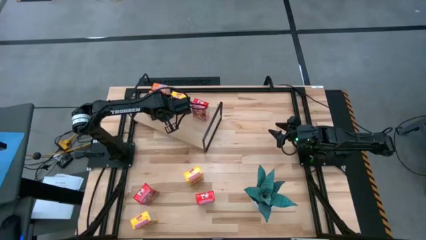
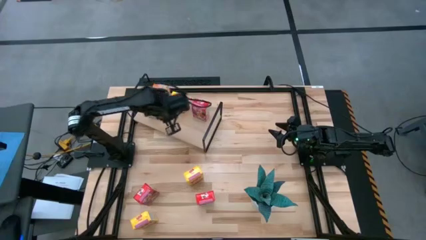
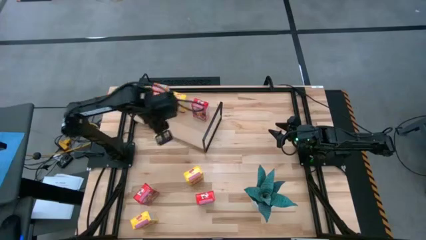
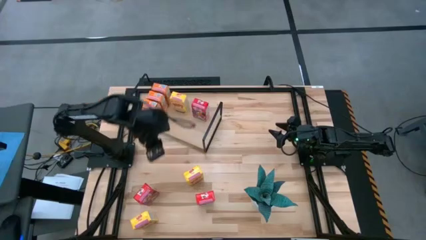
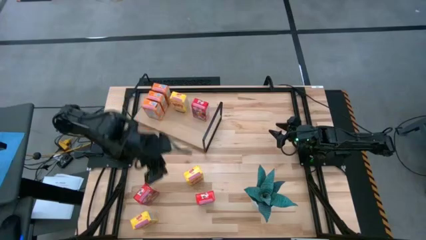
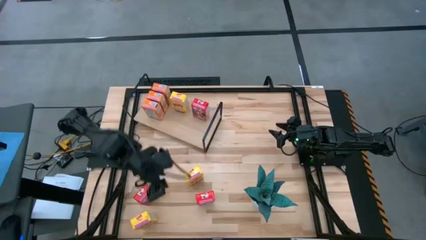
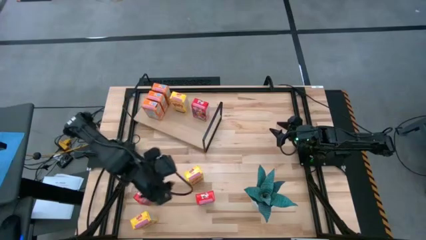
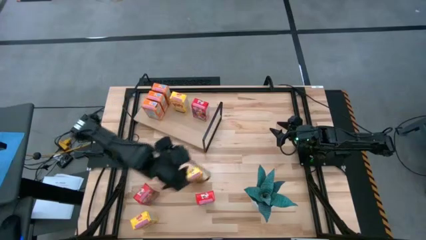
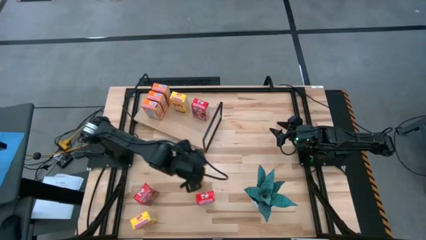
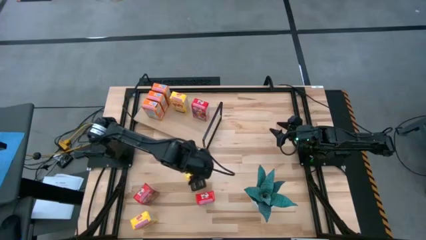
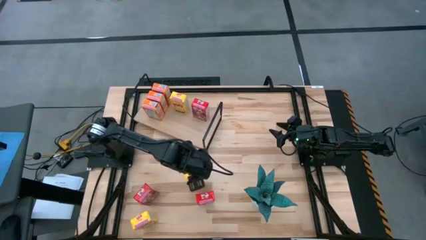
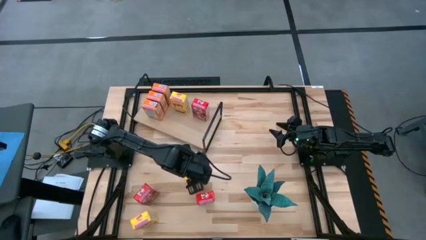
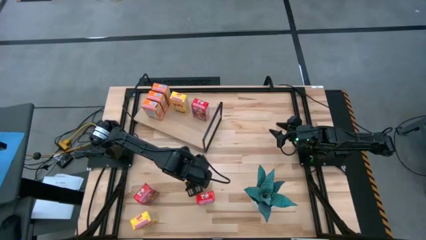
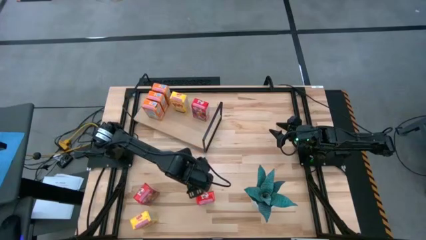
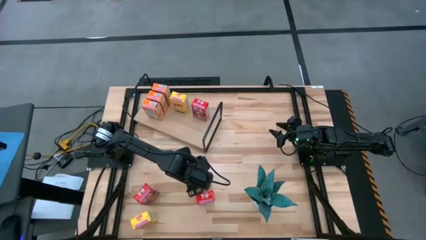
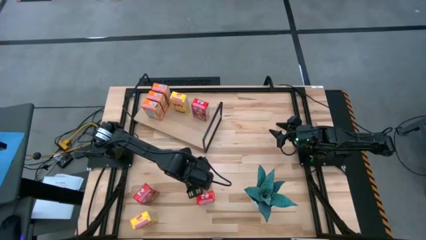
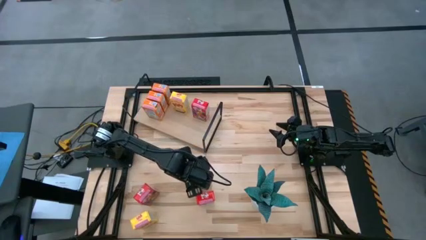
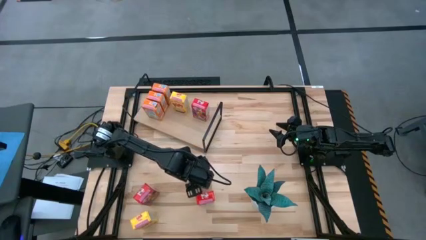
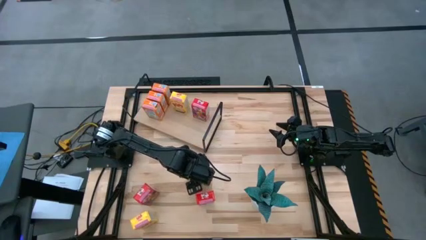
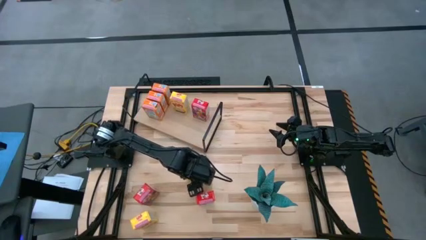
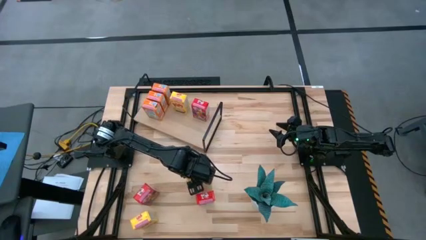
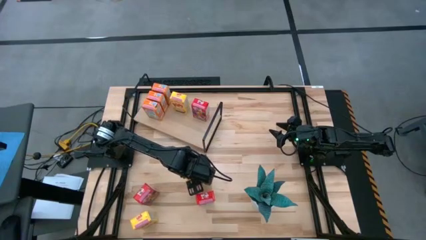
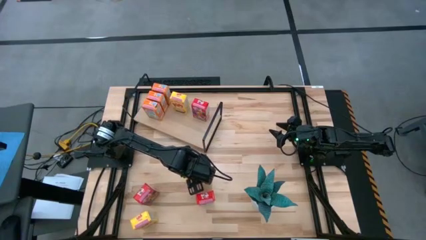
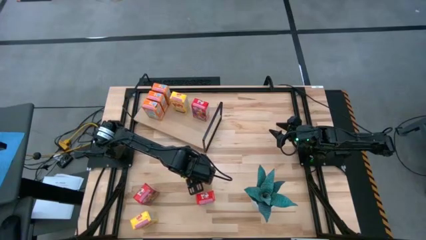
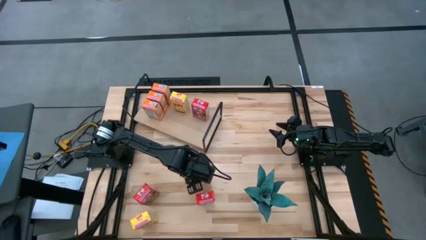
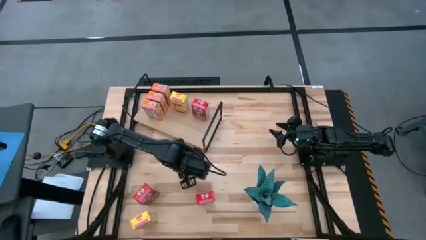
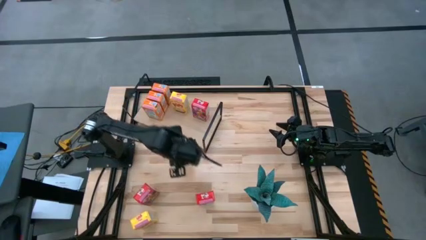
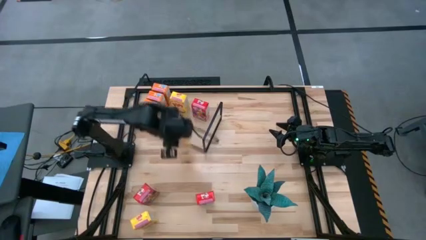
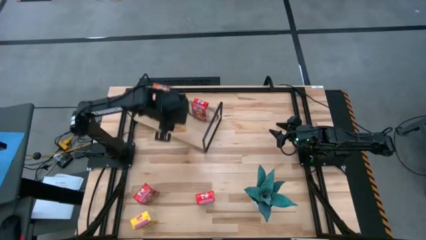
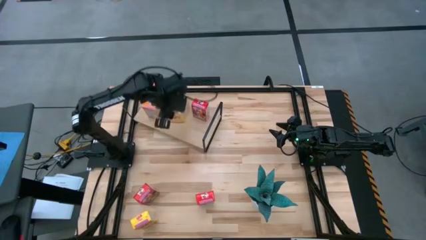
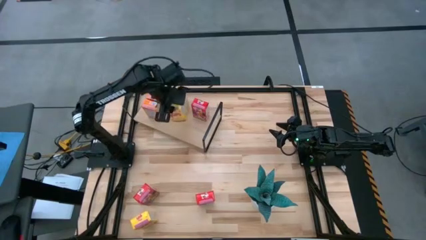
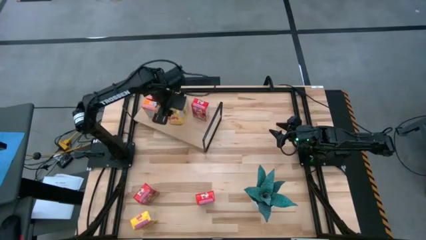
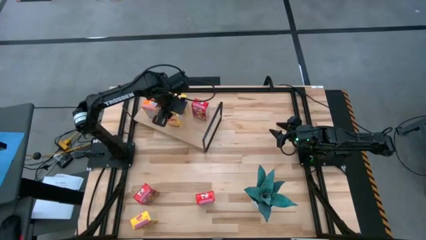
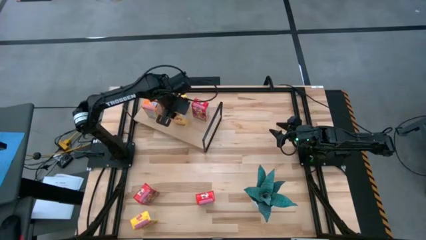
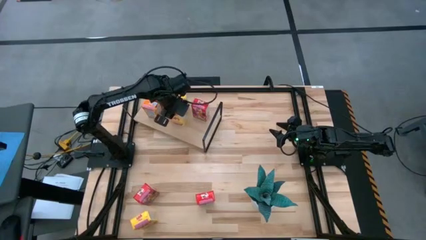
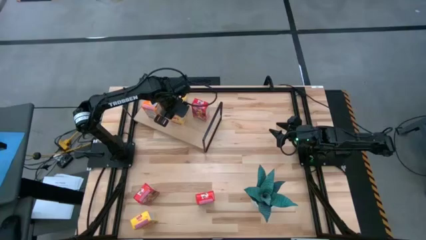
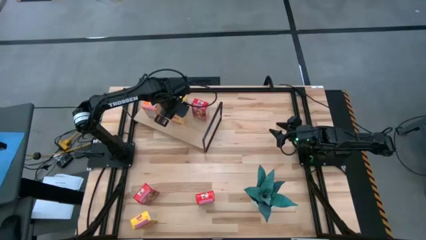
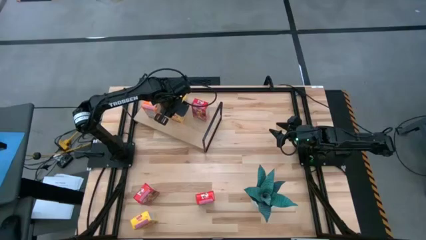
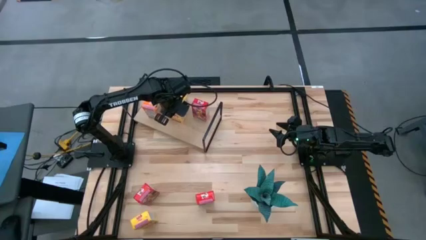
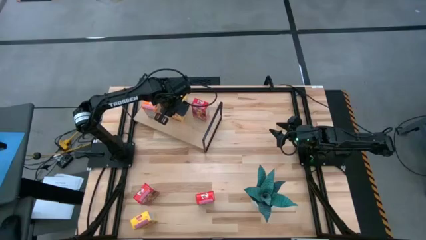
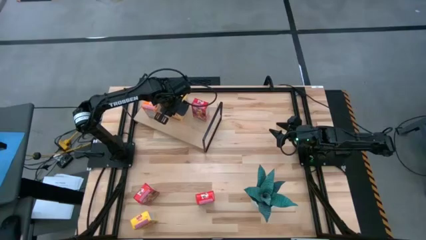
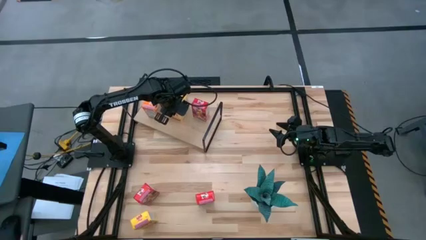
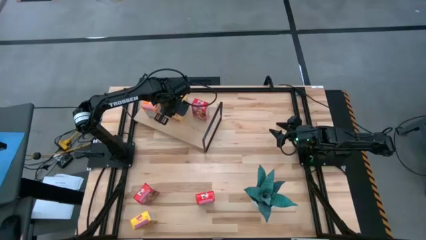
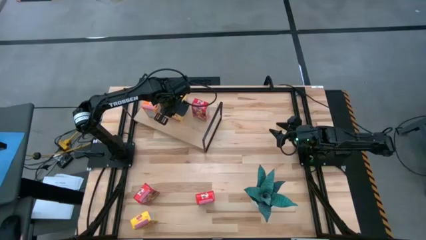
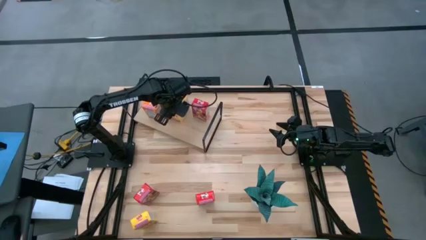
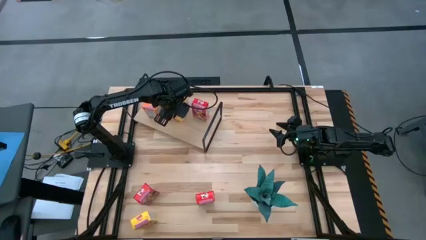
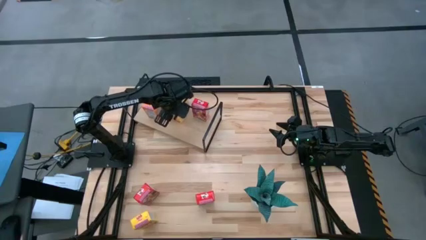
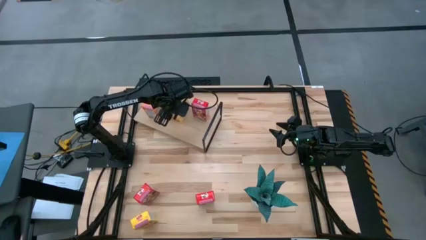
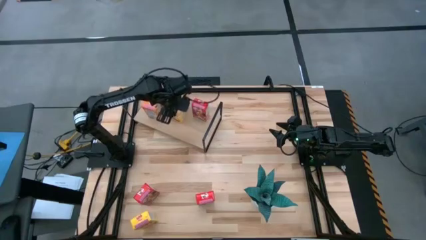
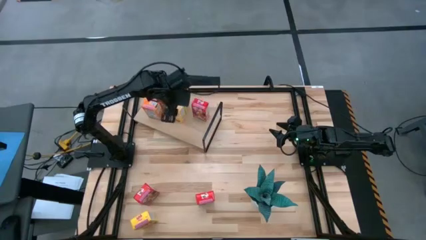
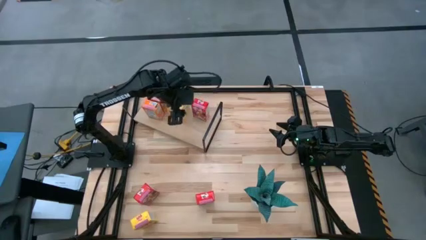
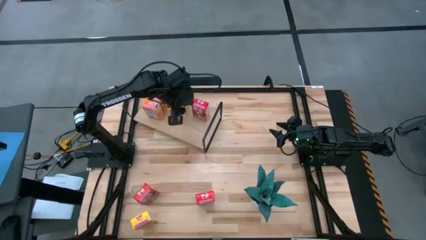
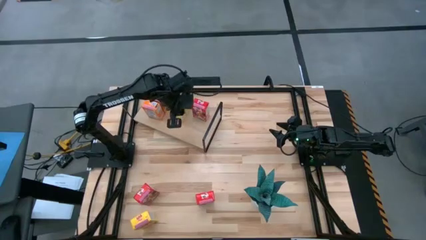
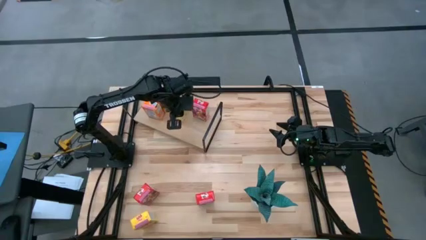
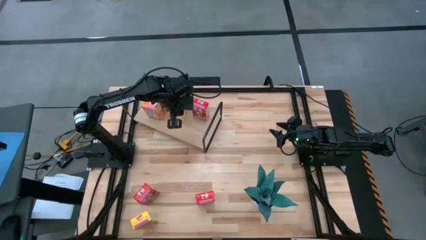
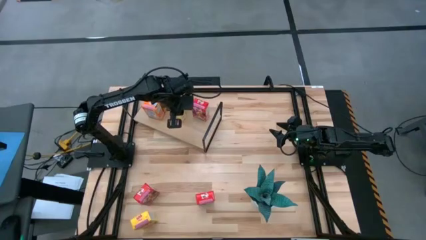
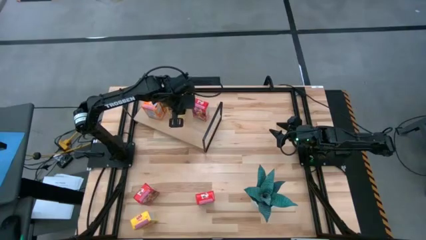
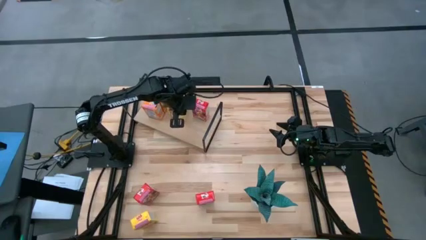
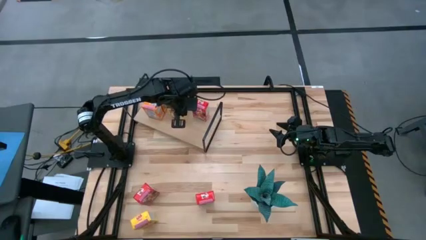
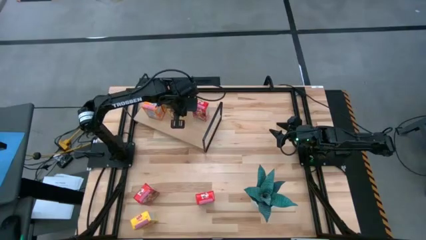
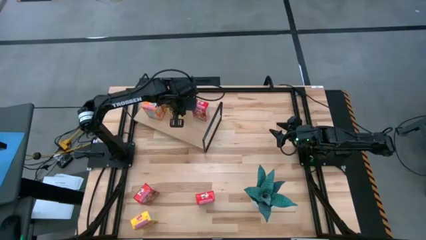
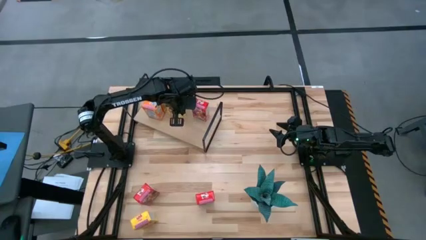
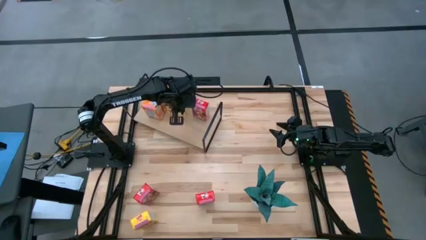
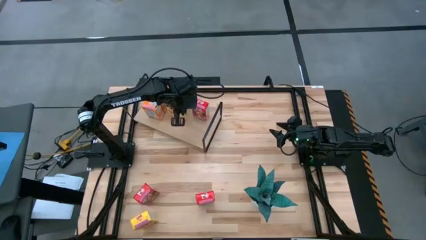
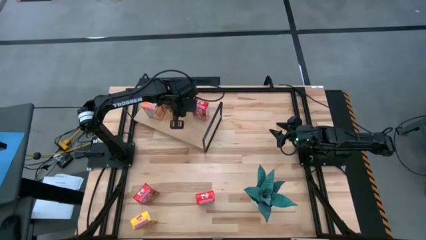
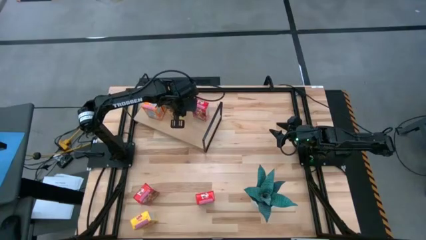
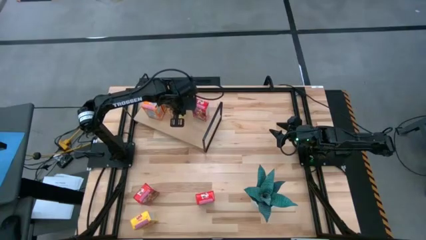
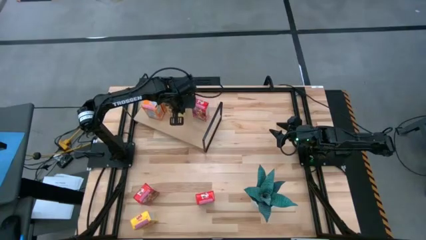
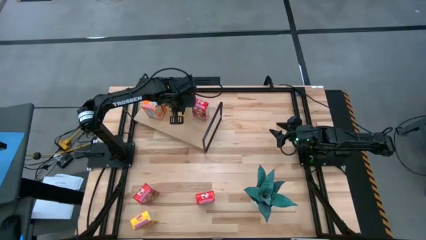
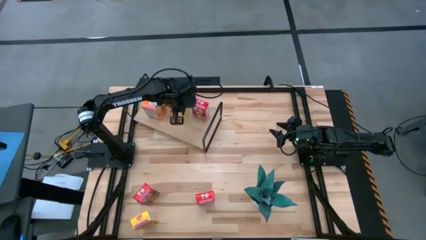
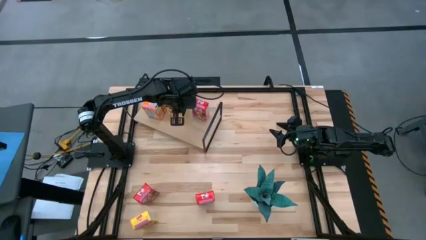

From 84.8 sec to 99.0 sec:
Task: Stack cereal on shelf
Put the top yellow cereal box aligned with the other yellow cereal box on the shelf
